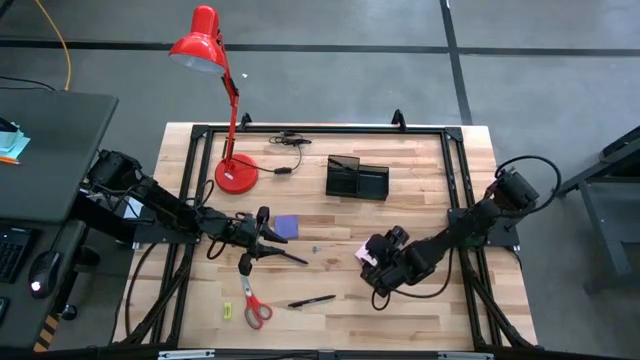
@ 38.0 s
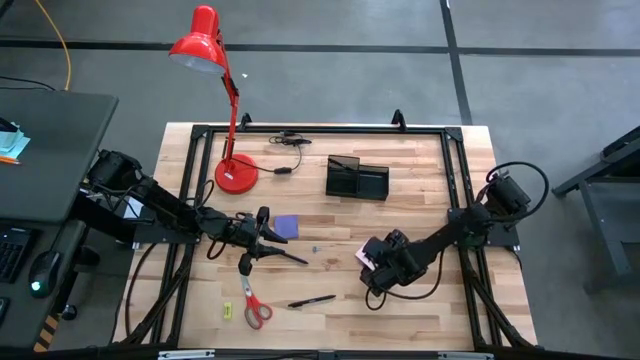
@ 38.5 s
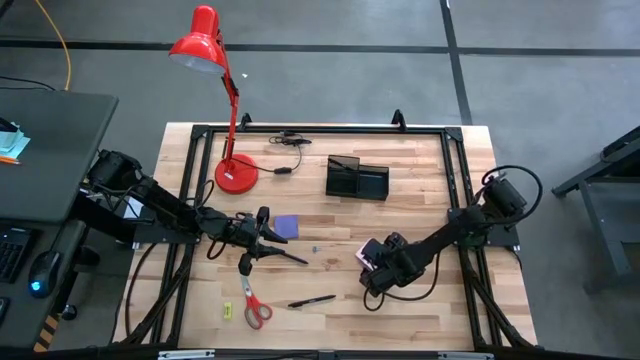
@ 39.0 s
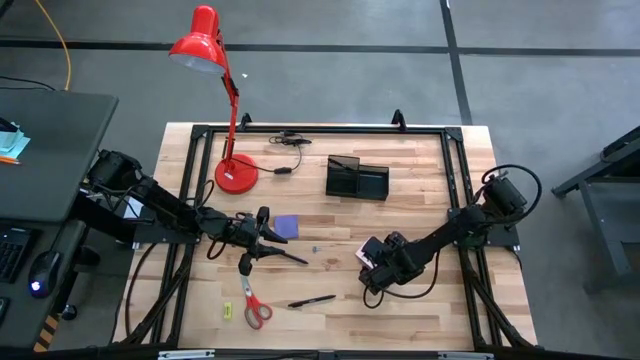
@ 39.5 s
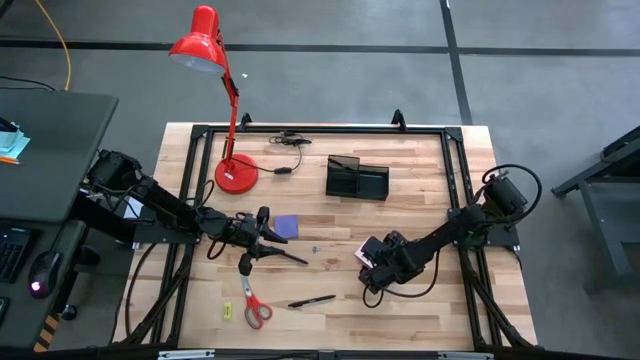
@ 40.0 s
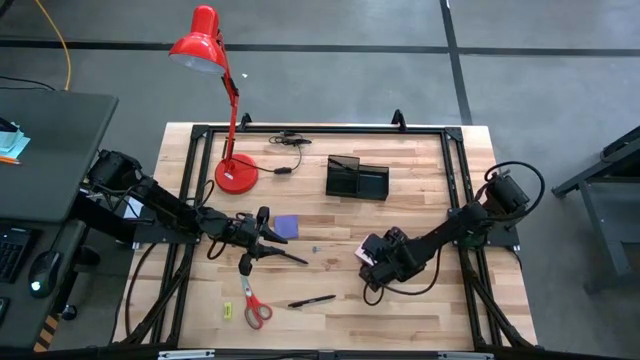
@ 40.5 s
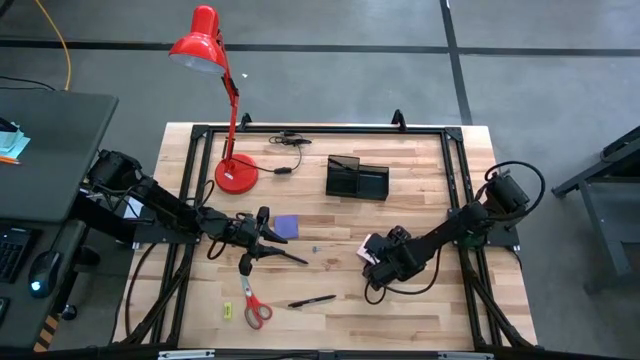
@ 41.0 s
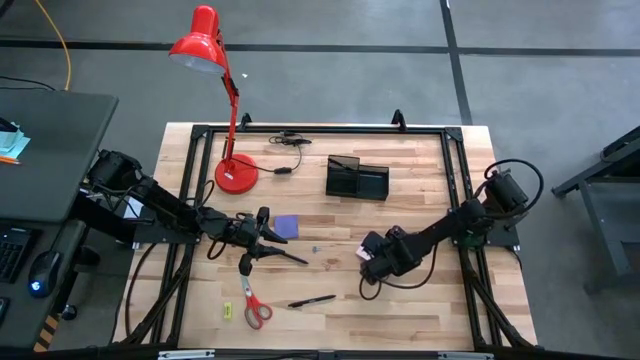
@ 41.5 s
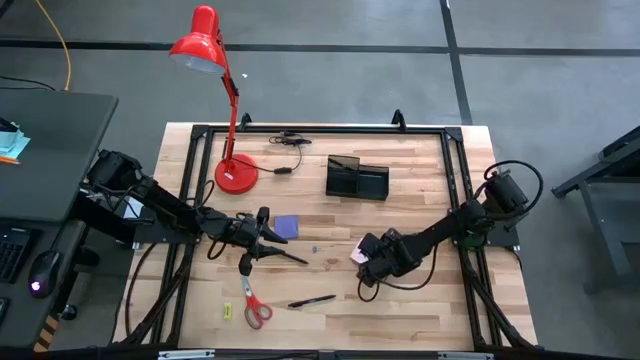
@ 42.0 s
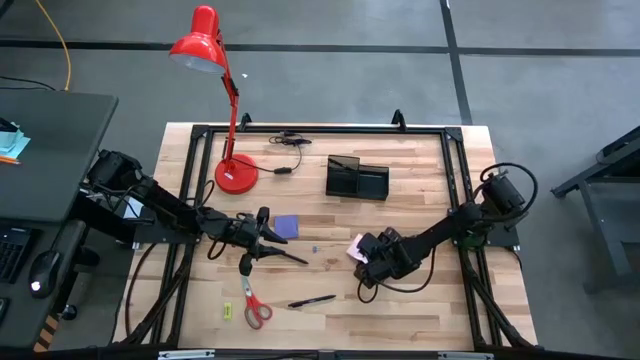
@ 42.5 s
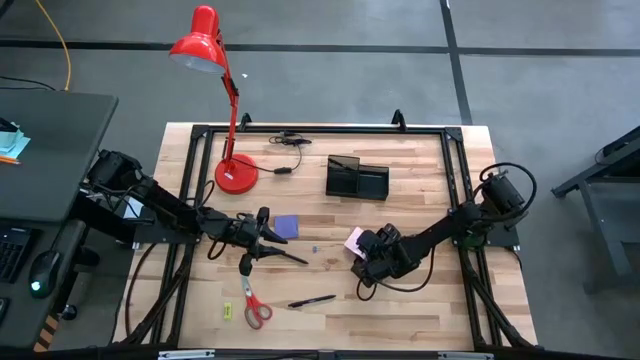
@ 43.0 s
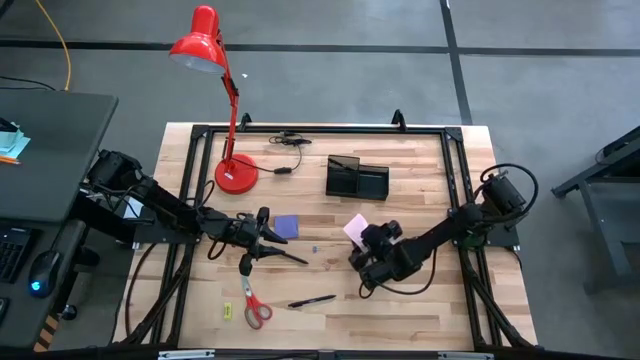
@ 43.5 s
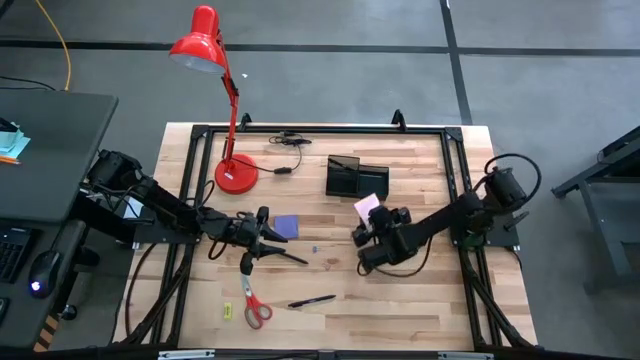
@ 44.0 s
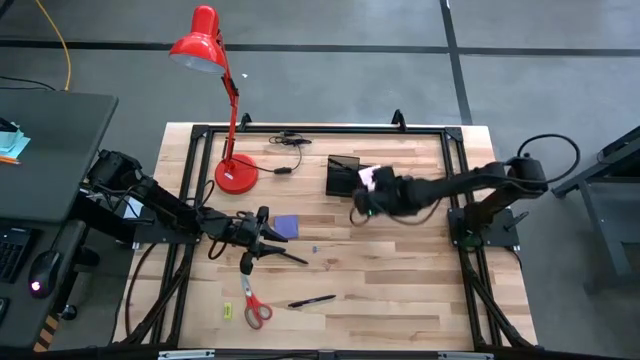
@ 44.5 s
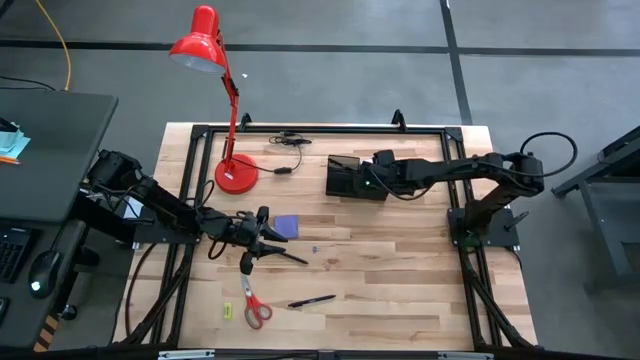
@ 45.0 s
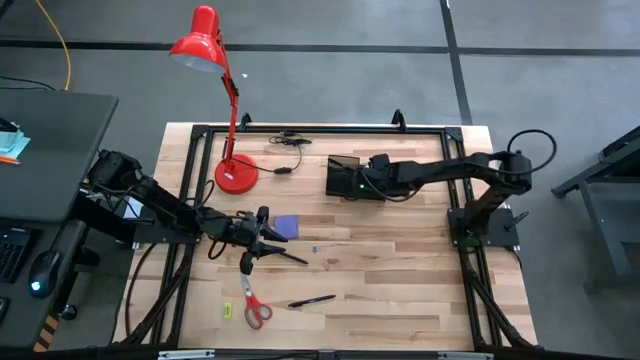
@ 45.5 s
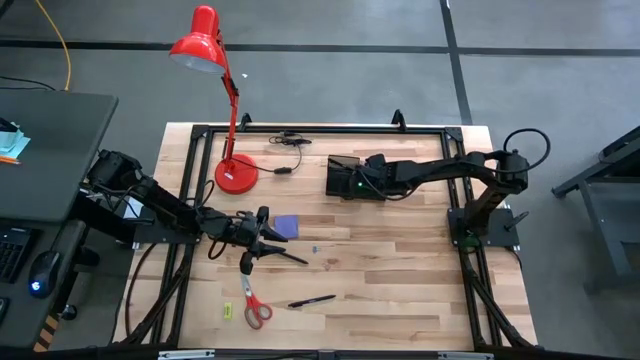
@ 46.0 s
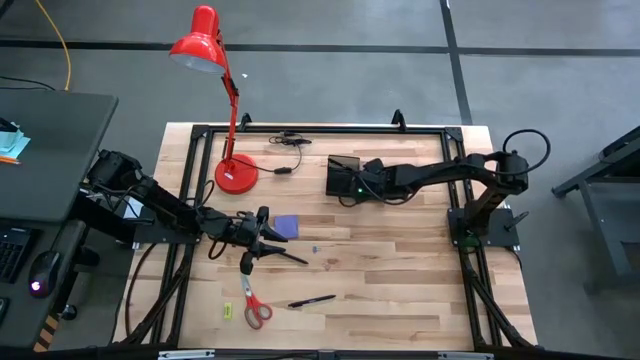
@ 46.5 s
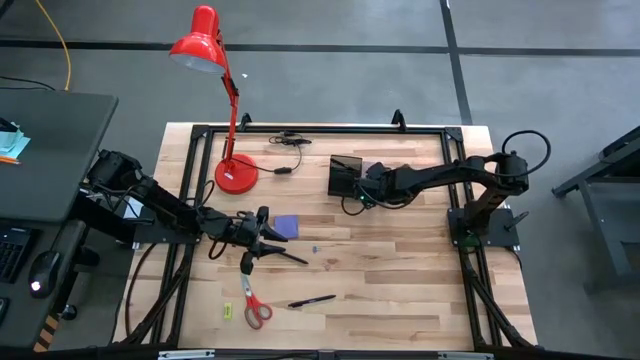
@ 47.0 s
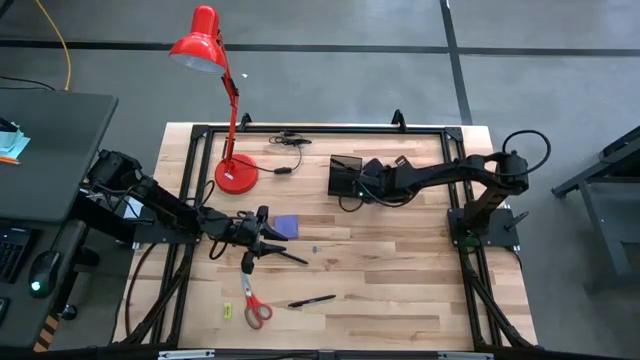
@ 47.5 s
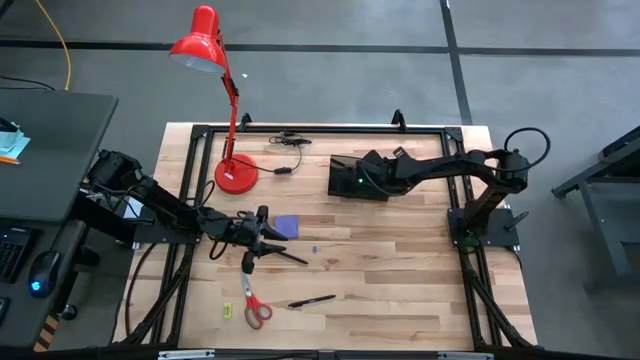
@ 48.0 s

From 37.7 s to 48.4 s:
Task: Pick and place office supplies into organizer
Put the pink sticky note into the black desk organizer

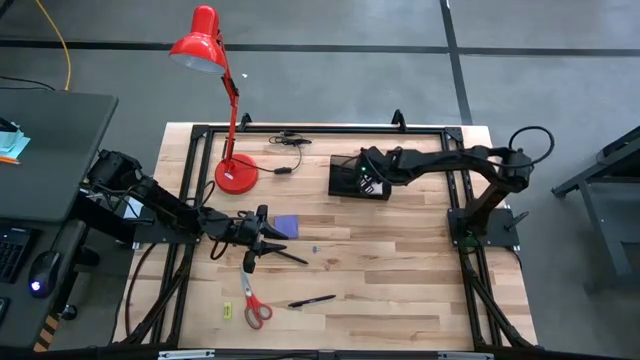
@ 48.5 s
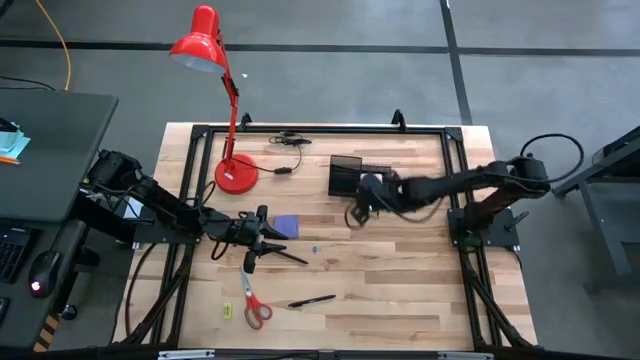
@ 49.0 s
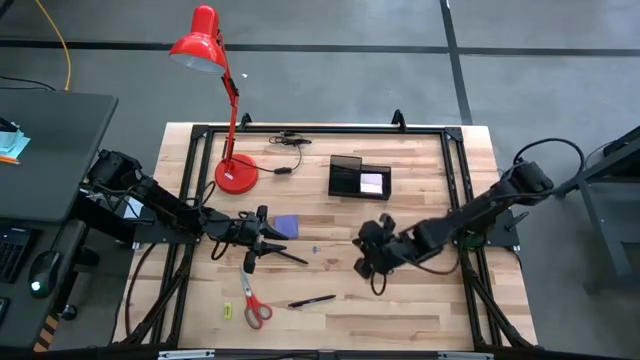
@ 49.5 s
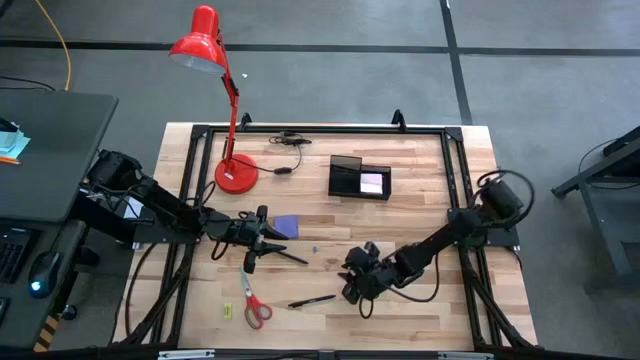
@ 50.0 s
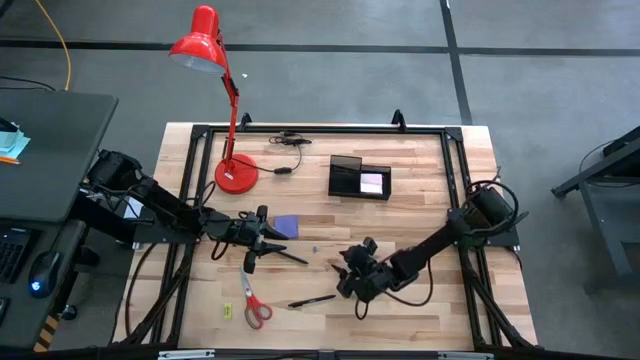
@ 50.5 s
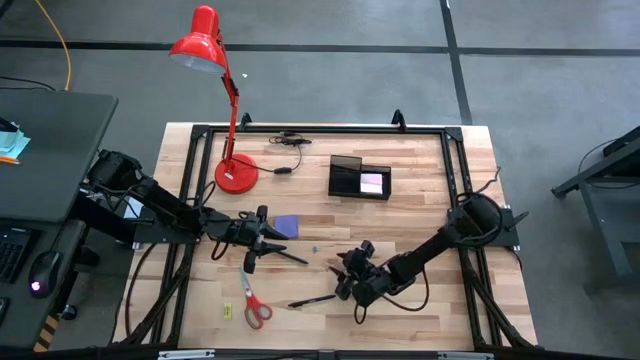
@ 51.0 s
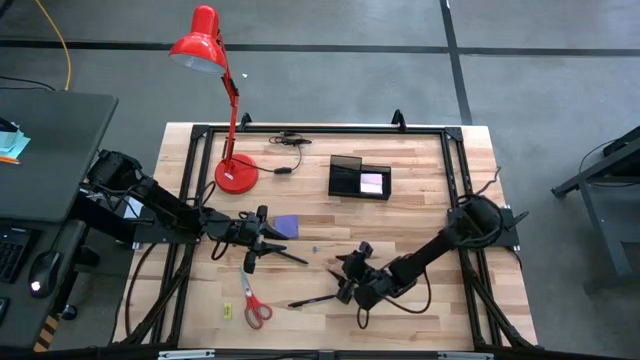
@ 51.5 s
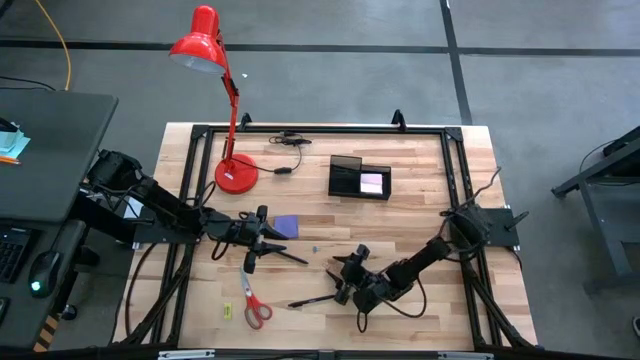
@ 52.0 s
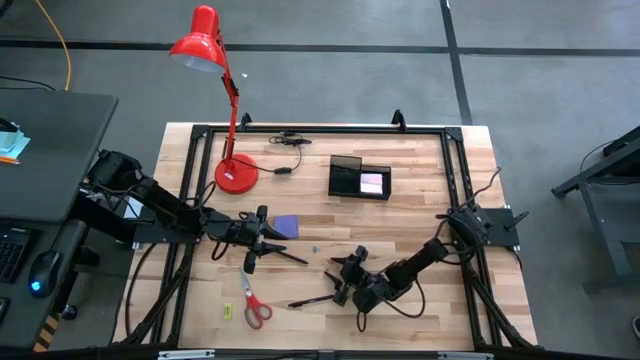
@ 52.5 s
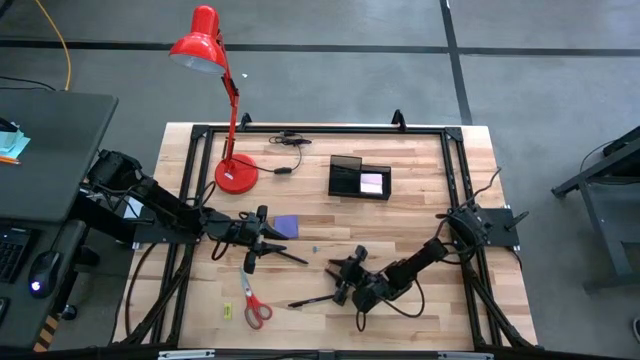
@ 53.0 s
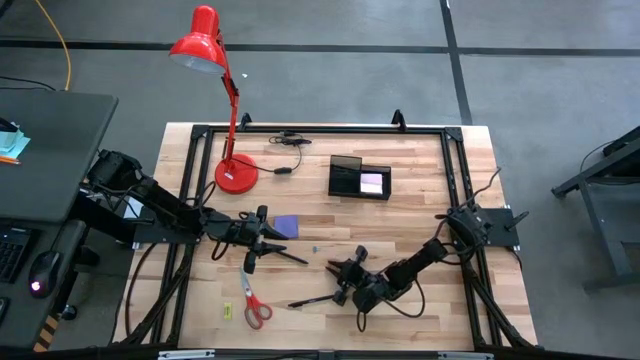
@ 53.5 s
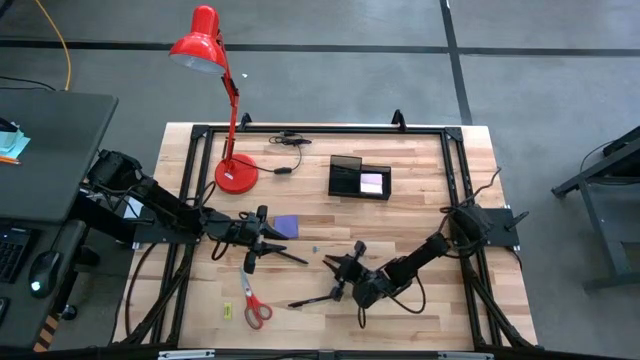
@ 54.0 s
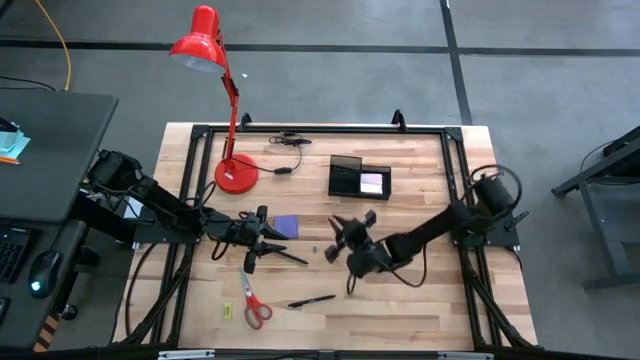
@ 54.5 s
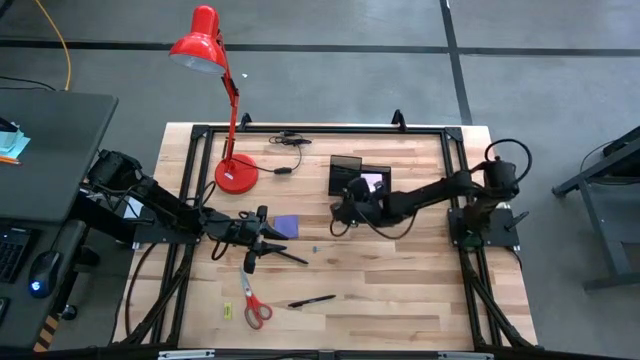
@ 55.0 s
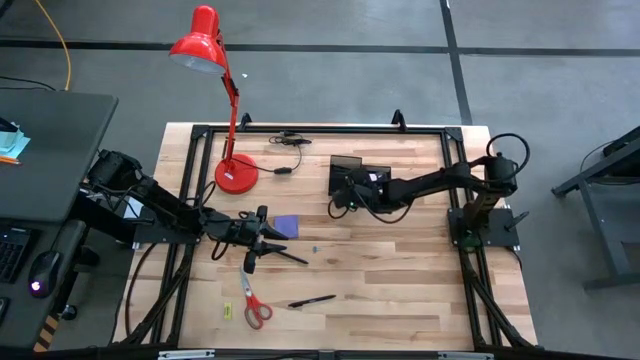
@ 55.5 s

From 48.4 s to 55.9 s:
Put the pink binder clip into the black desk organizer

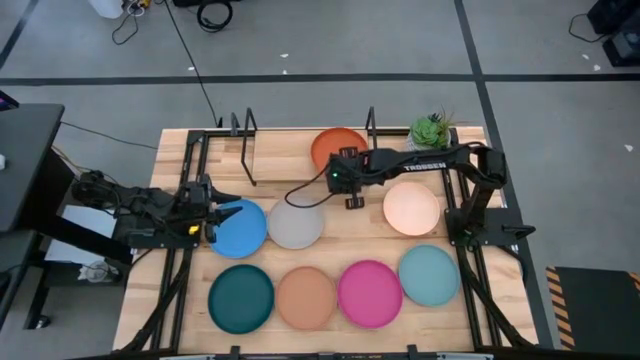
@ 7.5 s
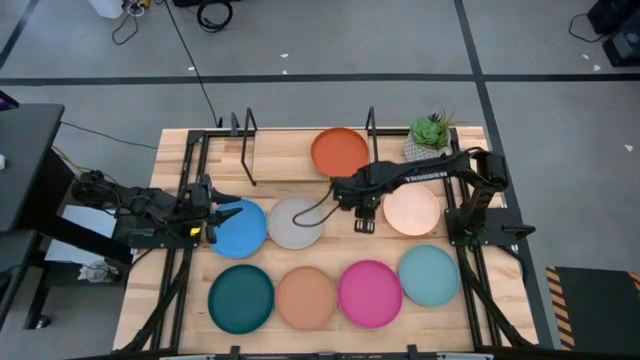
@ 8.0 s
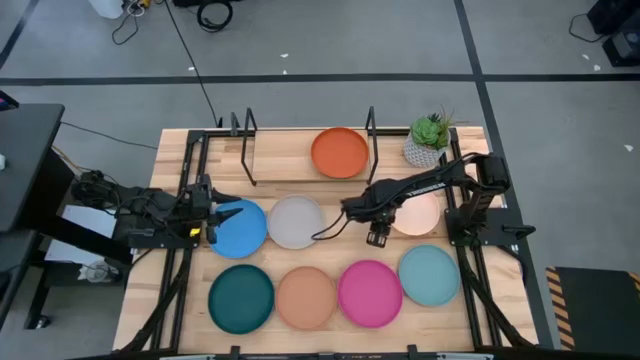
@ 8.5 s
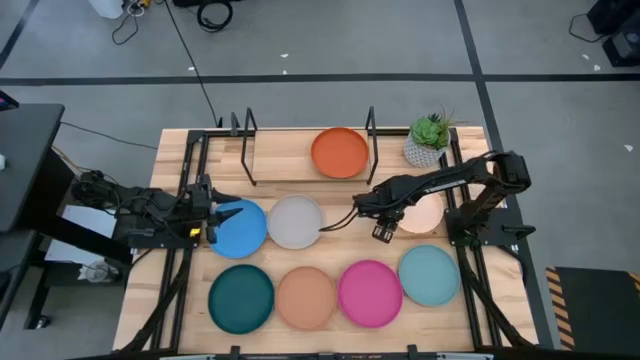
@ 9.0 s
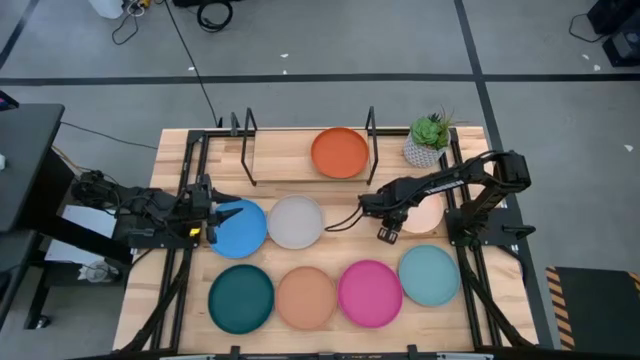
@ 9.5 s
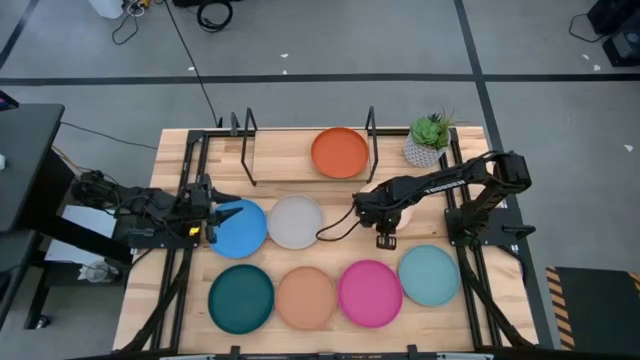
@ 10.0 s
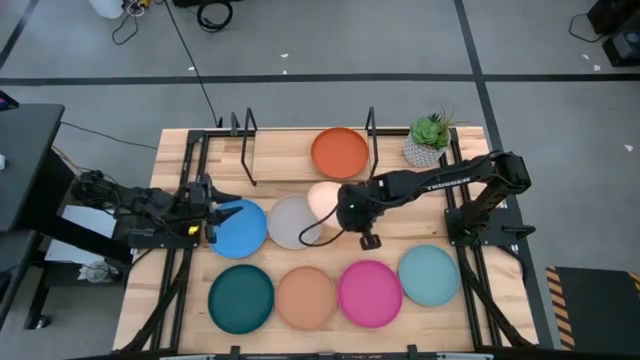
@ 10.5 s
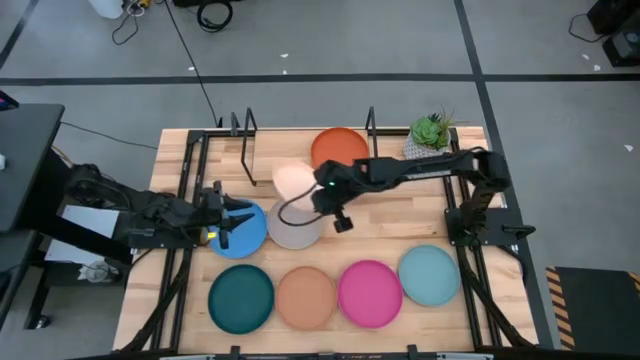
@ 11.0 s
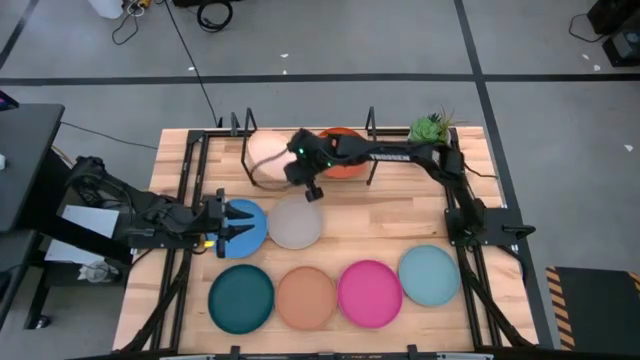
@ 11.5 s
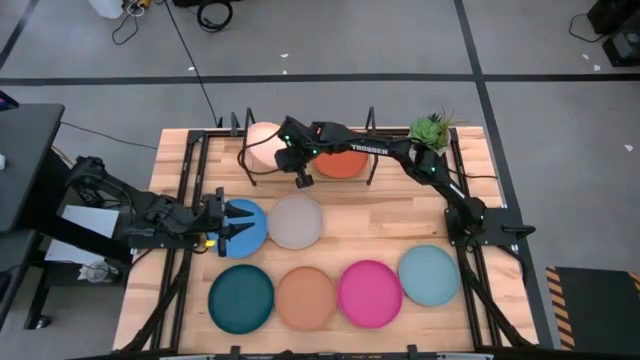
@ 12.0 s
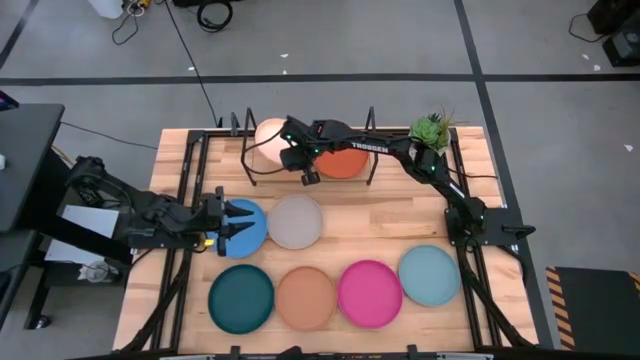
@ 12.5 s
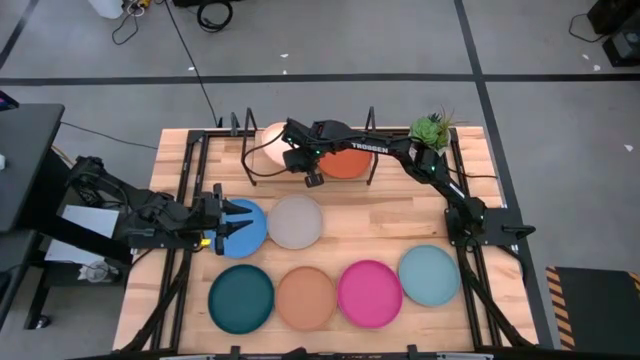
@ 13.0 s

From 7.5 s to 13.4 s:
Task: Place and stack plates onto a shelf
Put the white plate on the shelf
